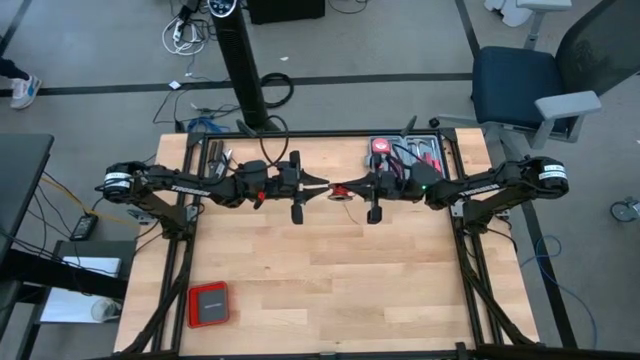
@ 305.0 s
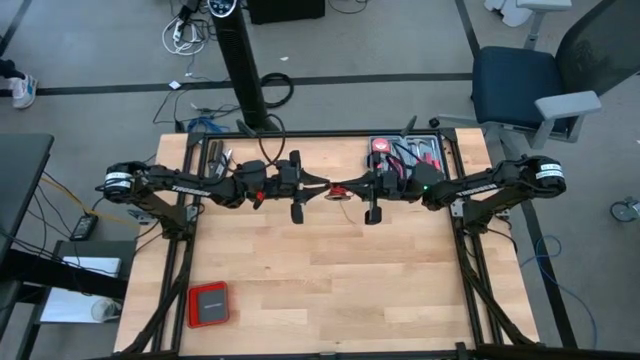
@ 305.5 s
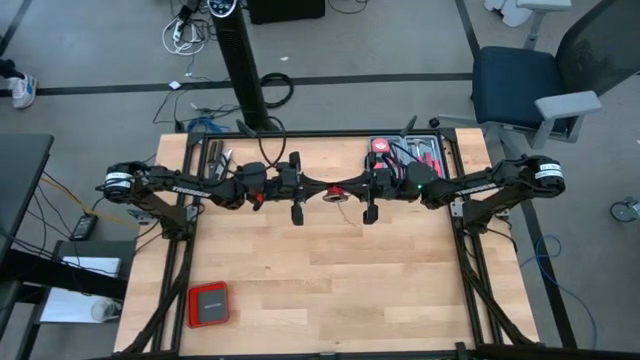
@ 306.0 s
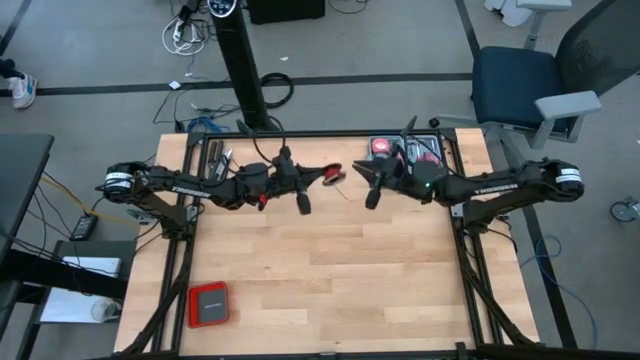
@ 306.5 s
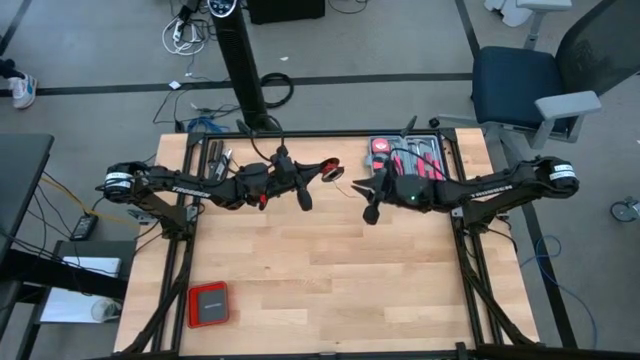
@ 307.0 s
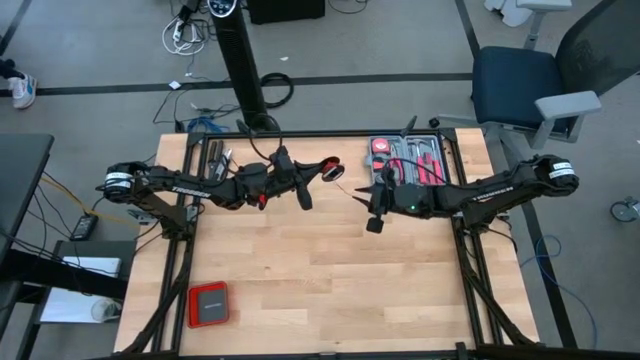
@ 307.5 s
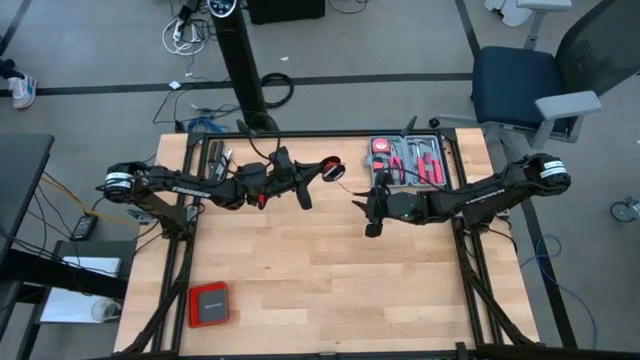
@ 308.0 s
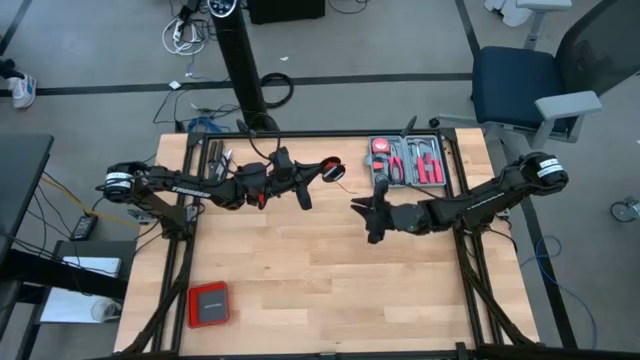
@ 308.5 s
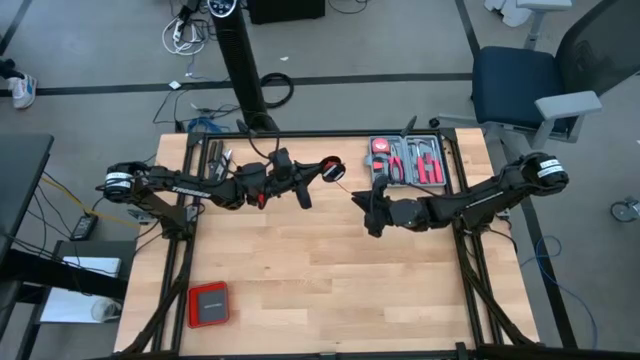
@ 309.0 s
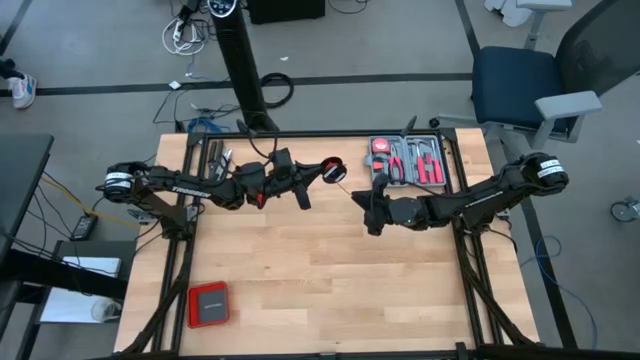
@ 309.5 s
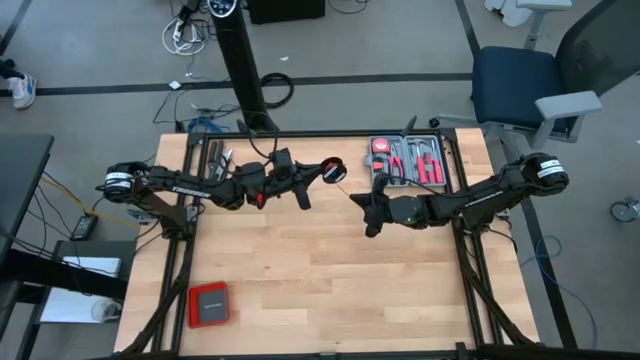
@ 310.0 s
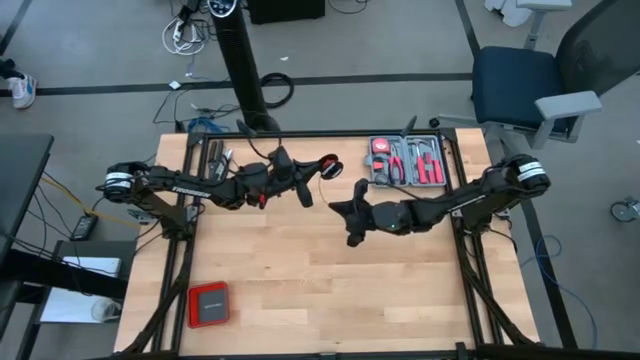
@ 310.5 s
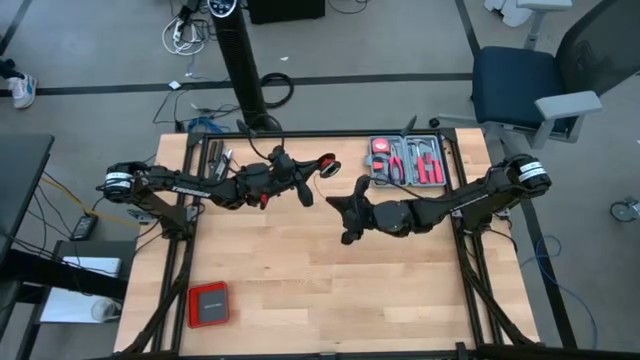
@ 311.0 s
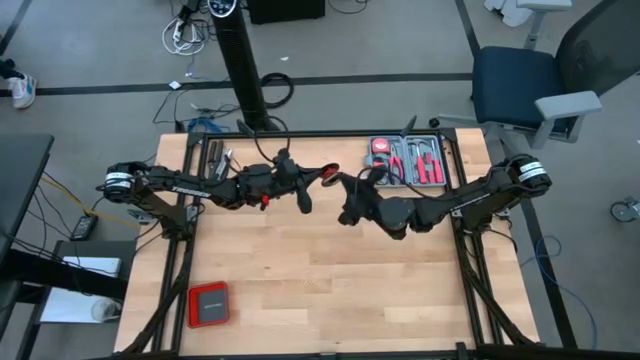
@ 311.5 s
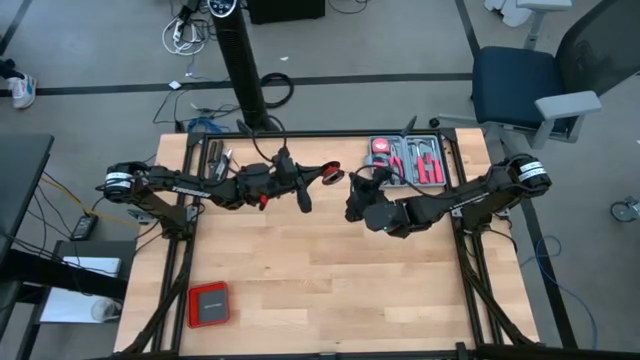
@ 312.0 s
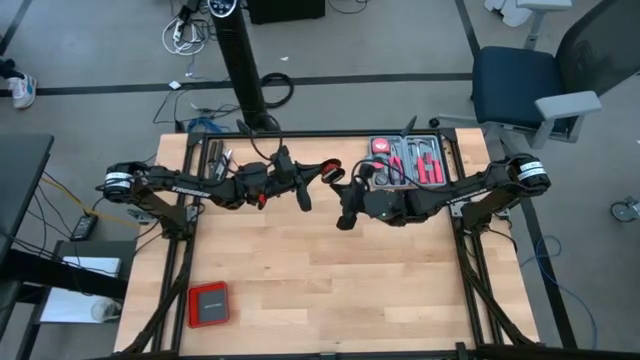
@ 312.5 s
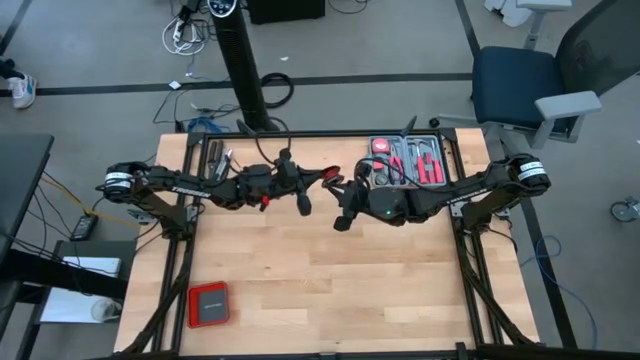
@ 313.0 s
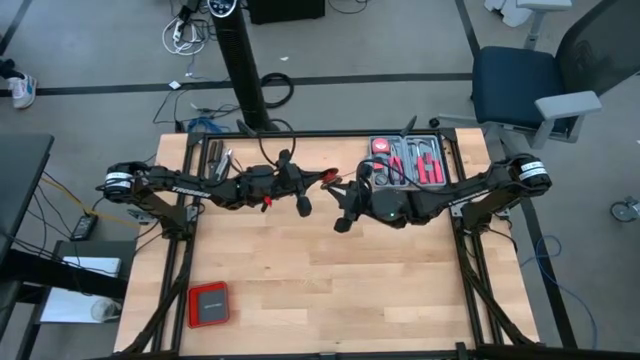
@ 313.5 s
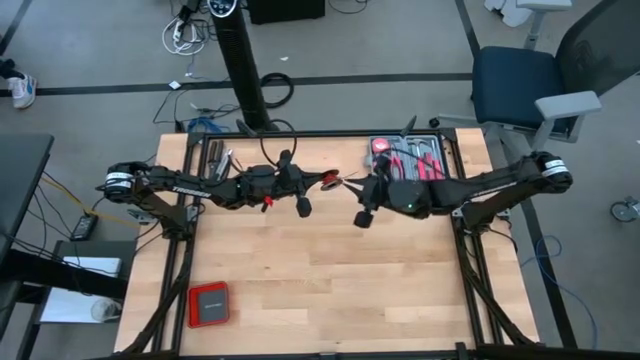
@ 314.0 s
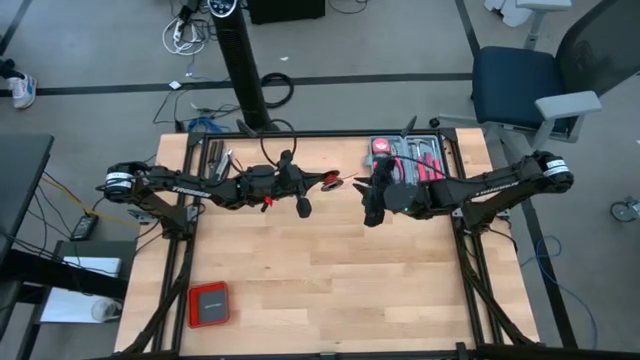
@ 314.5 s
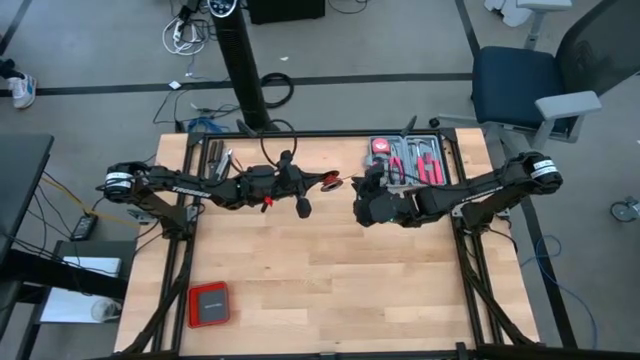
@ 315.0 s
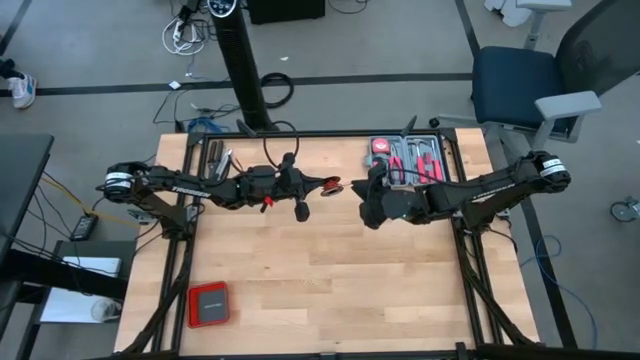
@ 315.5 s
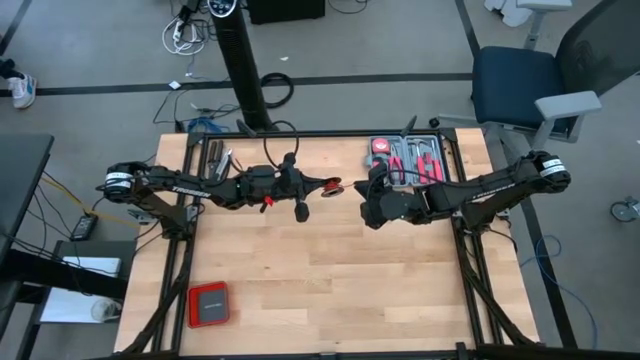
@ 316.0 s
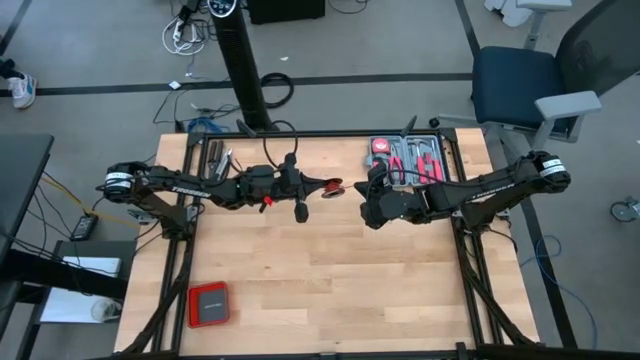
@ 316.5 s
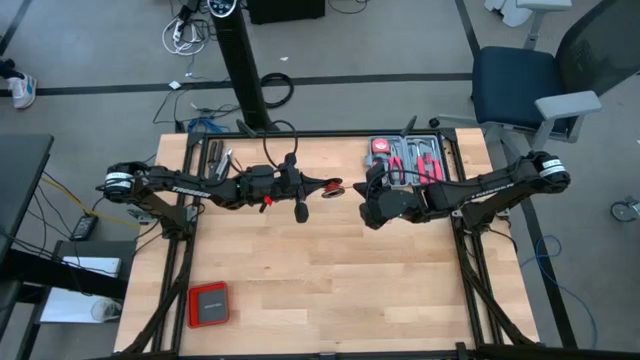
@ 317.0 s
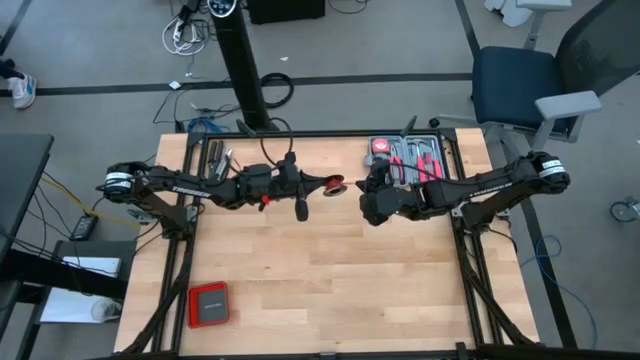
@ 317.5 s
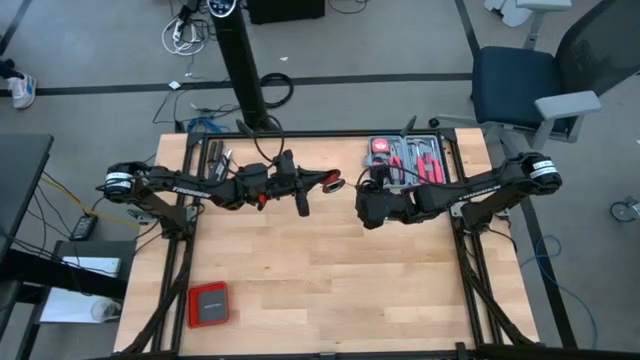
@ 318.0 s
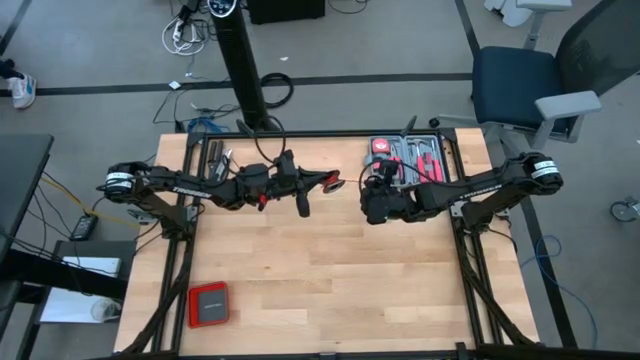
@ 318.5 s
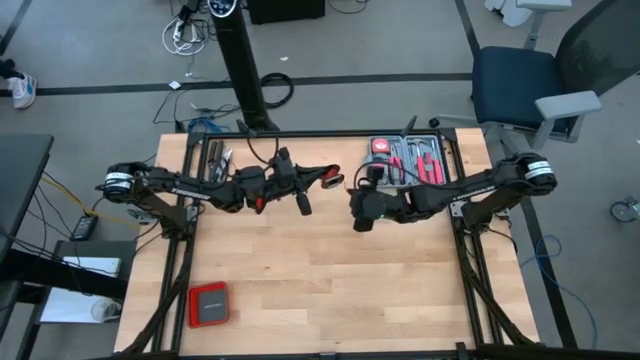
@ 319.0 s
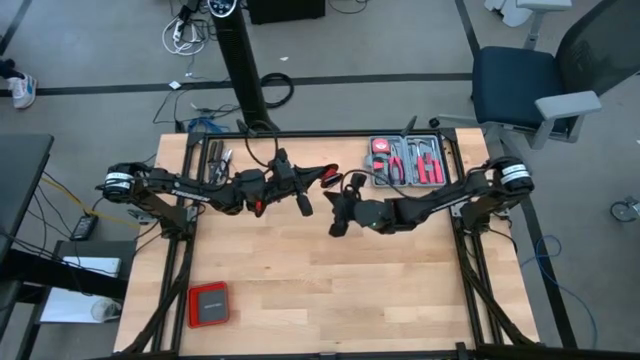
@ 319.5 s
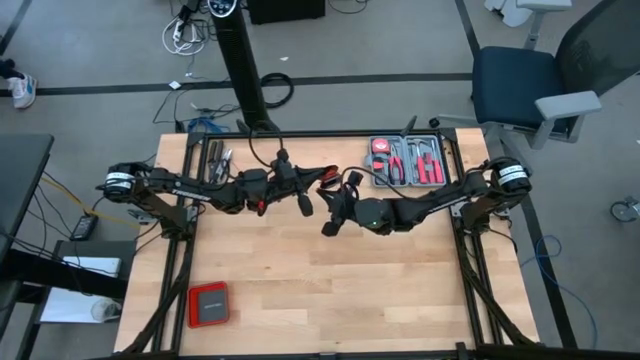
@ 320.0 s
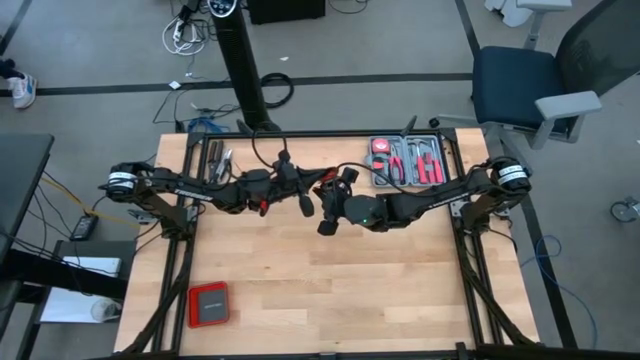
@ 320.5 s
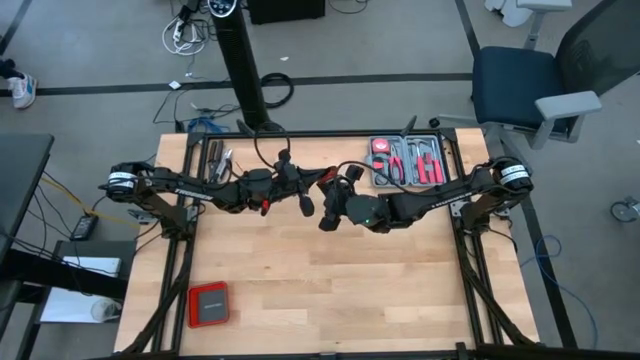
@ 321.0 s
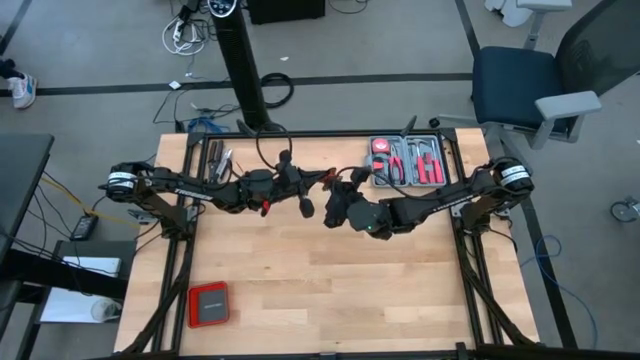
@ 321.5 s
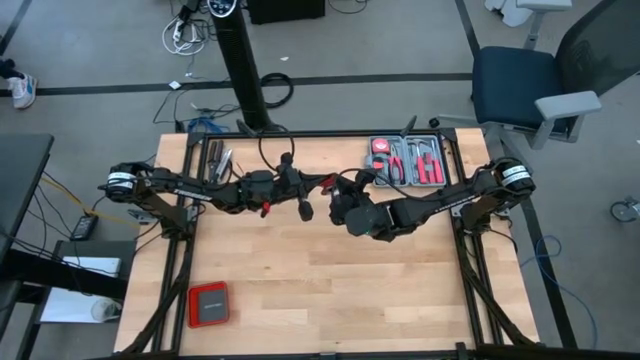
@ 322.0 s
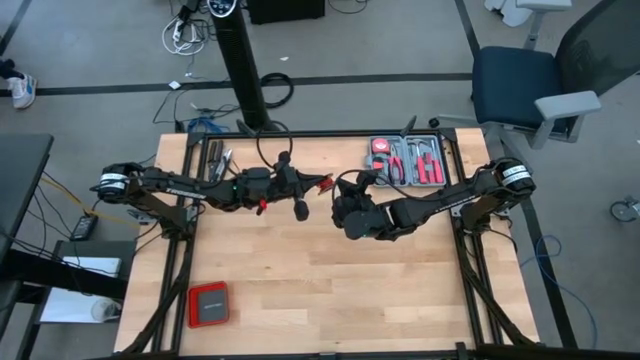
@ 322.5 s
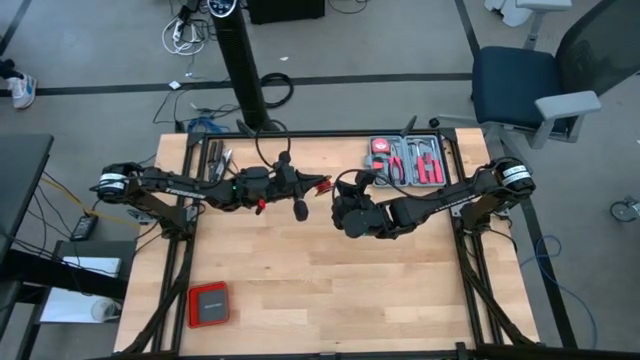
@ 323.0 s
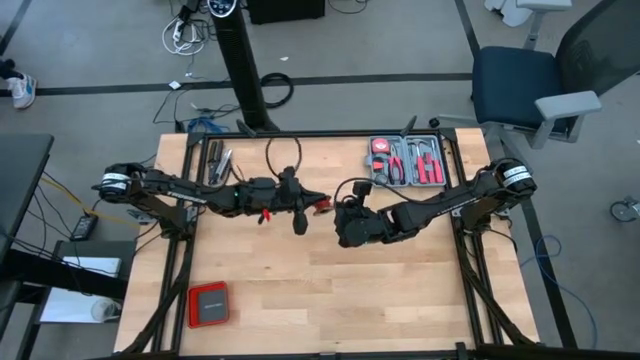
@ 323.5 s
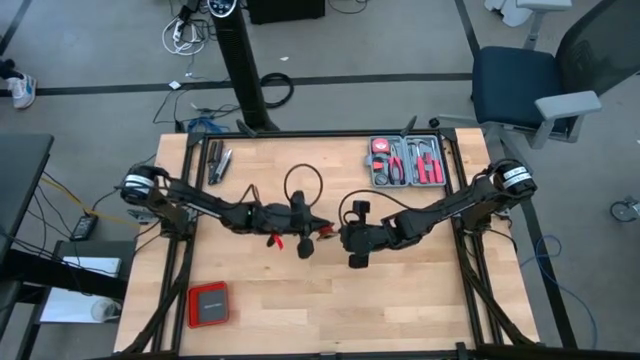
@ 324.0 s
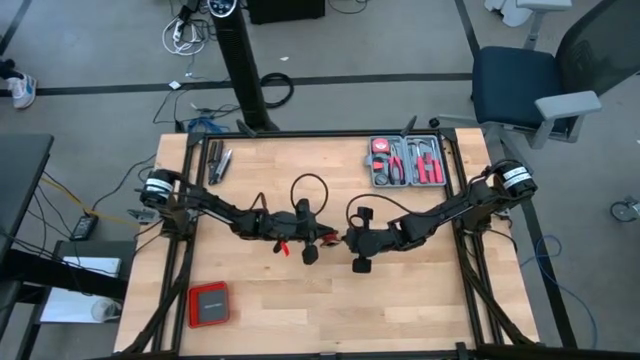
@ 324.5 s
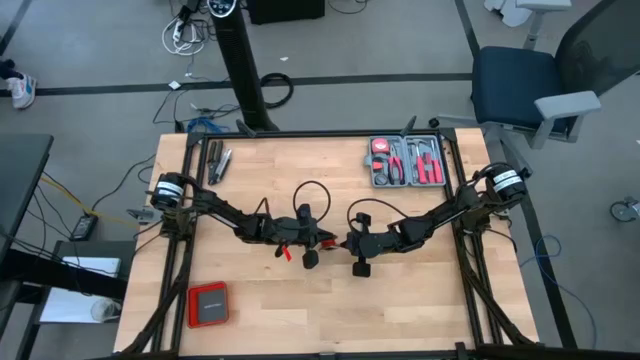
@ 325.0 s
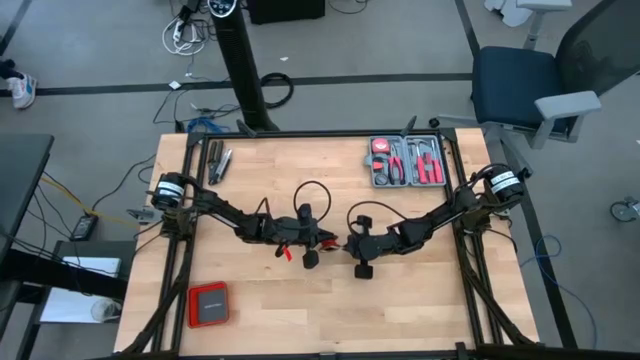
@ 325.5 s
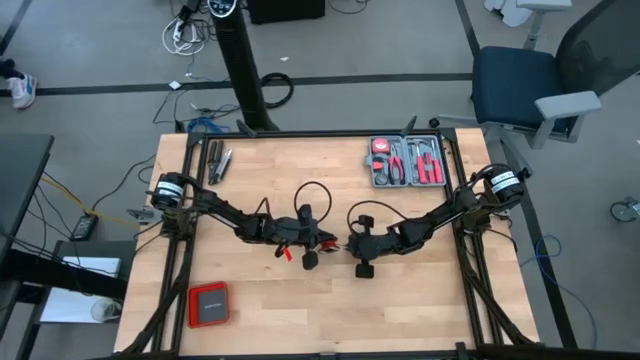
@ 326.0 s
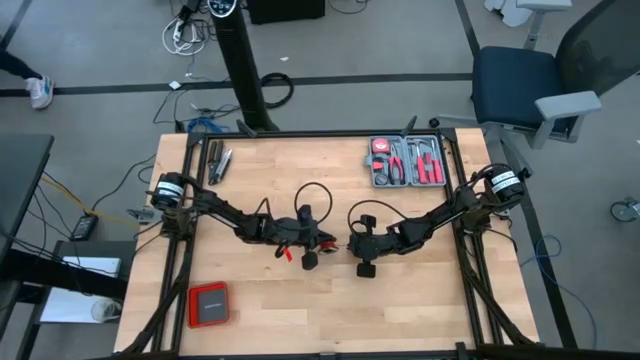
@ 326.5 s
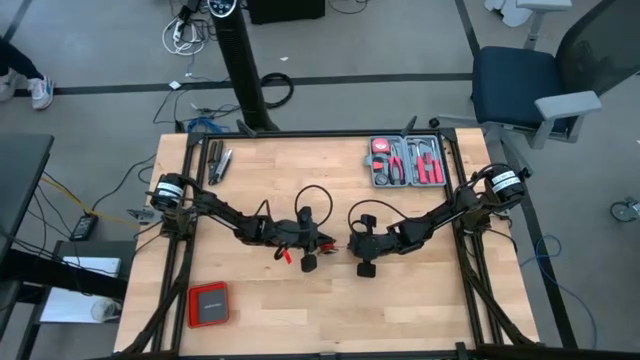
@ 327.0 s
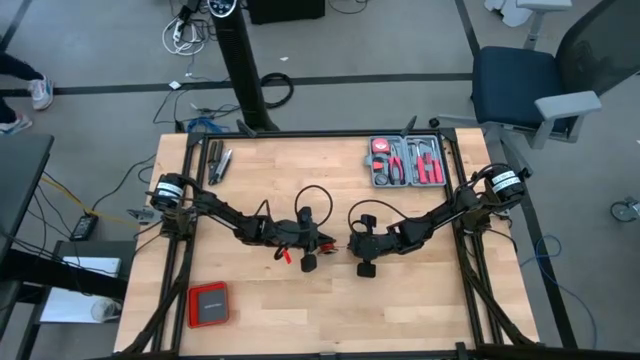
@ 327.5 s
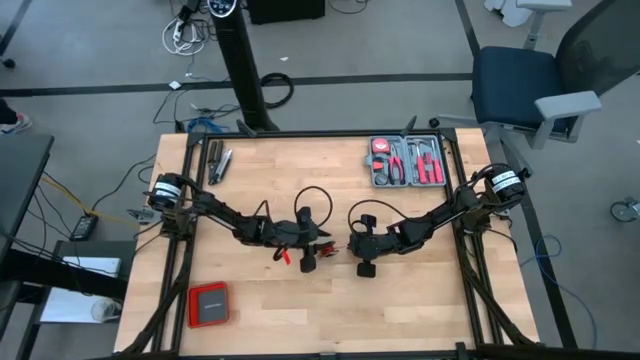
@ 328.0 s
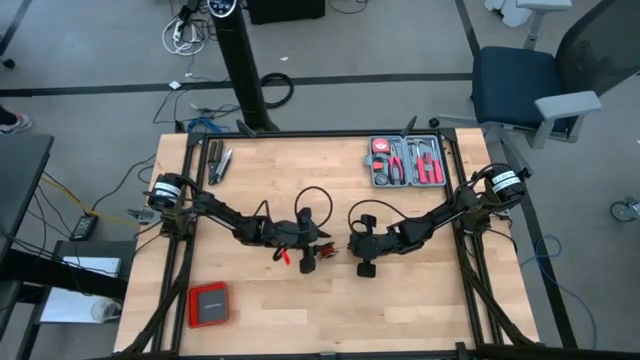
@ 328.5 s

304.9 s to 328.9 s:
Task: Coil cords
Coil the red cable wire onto the black spool
